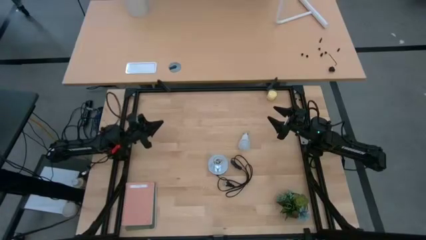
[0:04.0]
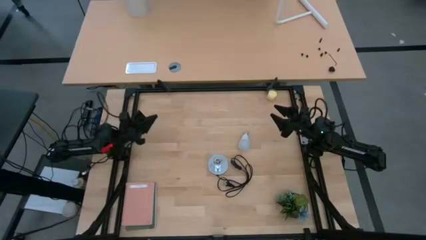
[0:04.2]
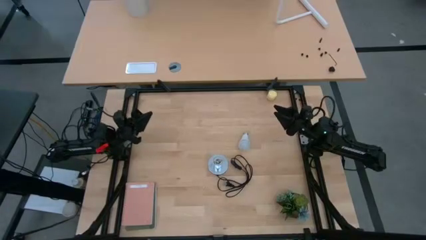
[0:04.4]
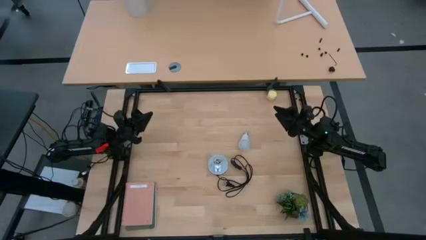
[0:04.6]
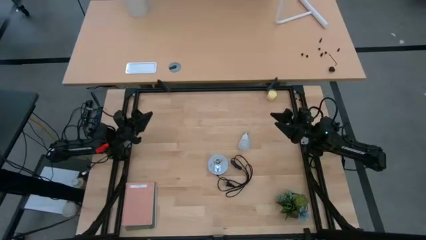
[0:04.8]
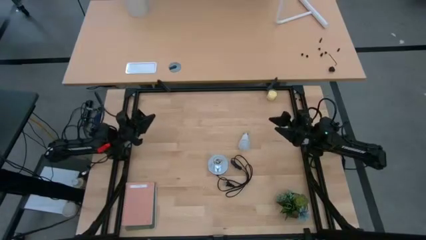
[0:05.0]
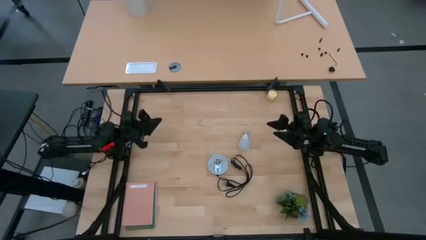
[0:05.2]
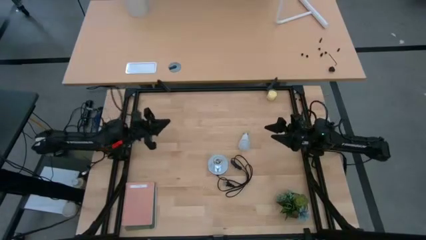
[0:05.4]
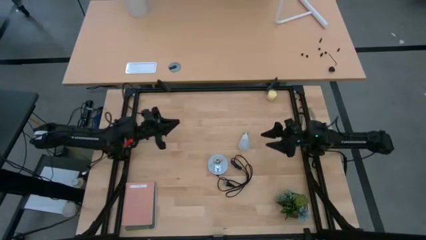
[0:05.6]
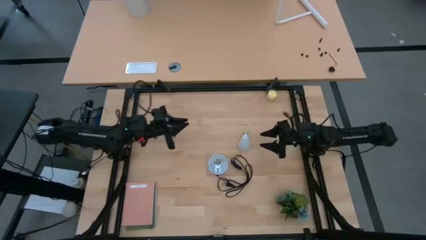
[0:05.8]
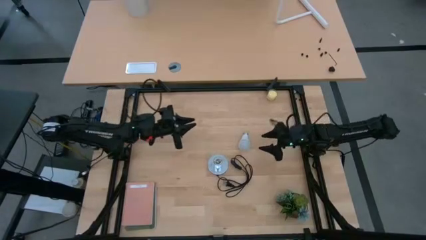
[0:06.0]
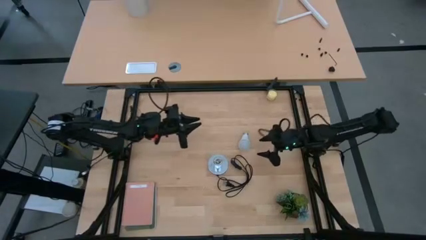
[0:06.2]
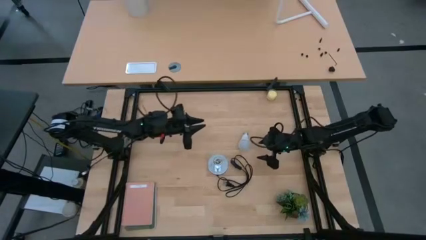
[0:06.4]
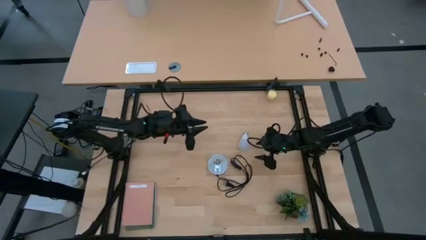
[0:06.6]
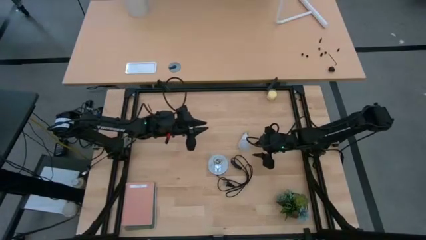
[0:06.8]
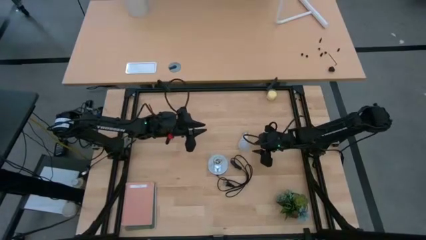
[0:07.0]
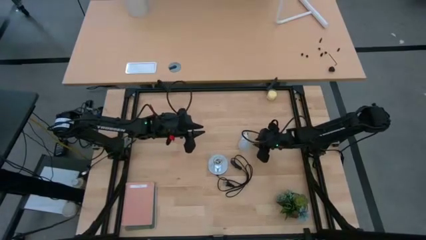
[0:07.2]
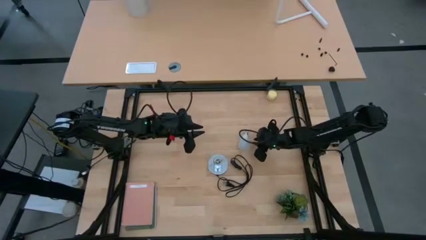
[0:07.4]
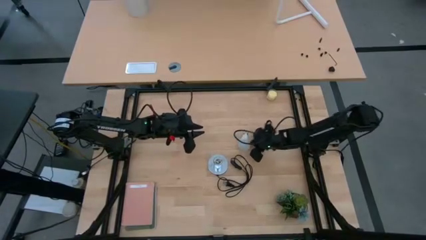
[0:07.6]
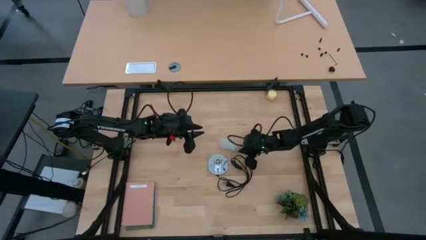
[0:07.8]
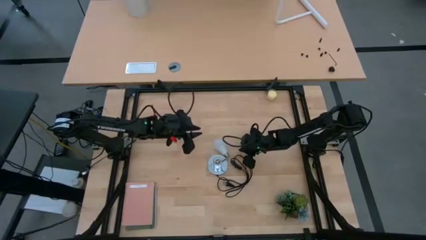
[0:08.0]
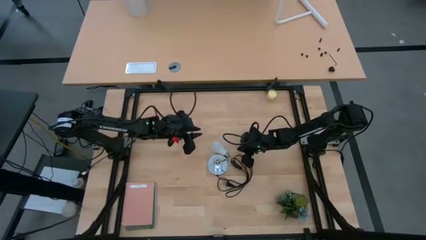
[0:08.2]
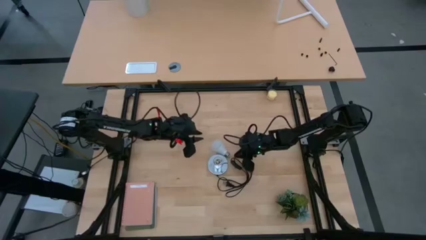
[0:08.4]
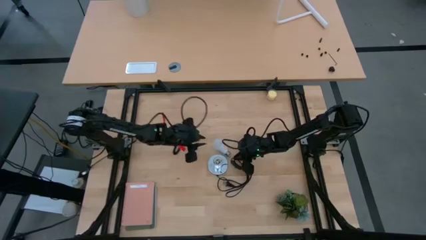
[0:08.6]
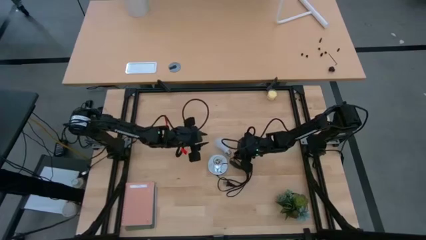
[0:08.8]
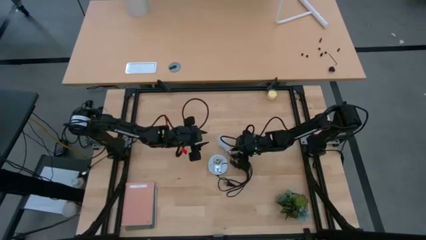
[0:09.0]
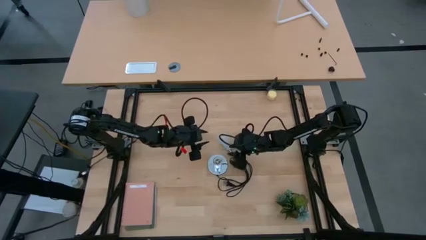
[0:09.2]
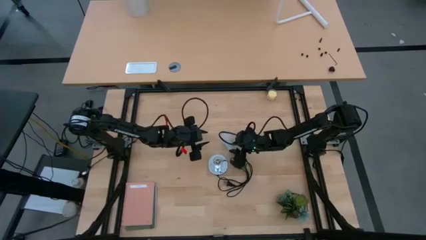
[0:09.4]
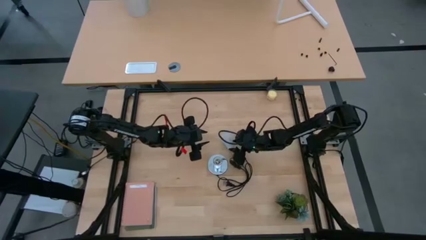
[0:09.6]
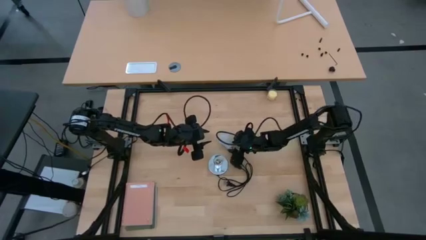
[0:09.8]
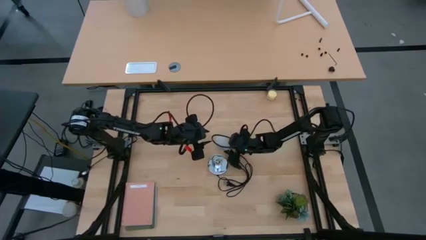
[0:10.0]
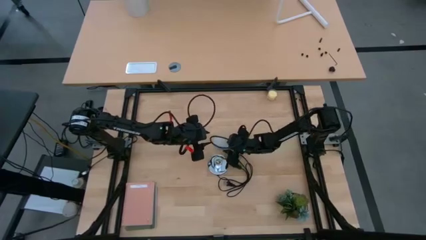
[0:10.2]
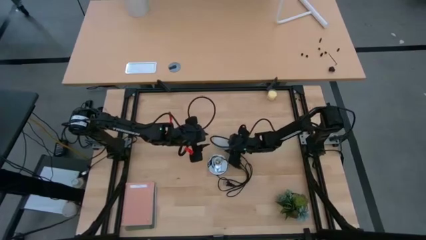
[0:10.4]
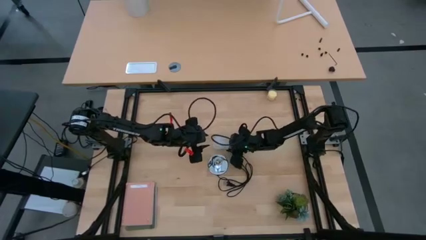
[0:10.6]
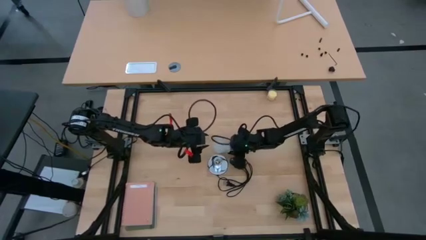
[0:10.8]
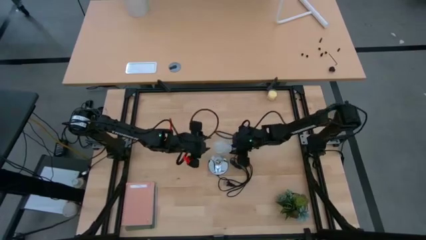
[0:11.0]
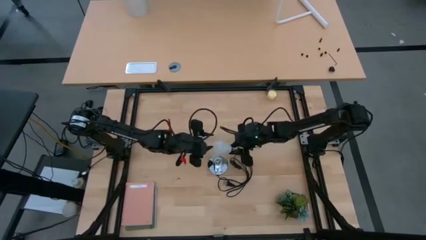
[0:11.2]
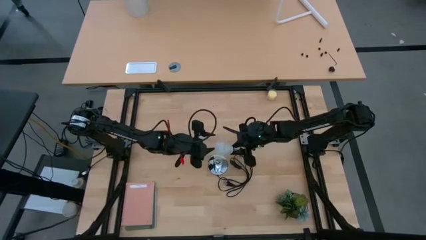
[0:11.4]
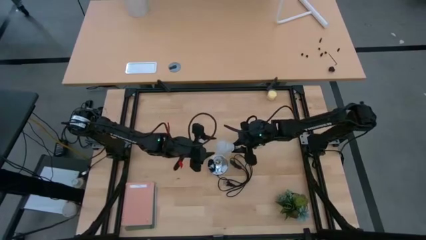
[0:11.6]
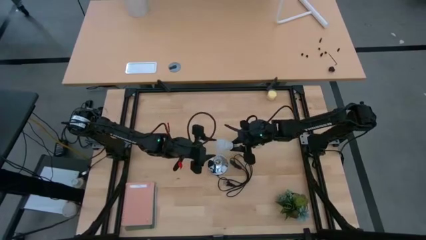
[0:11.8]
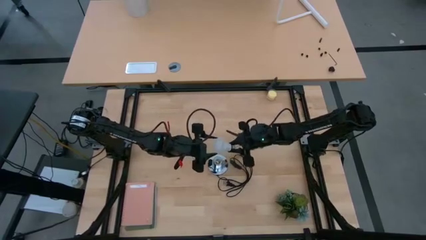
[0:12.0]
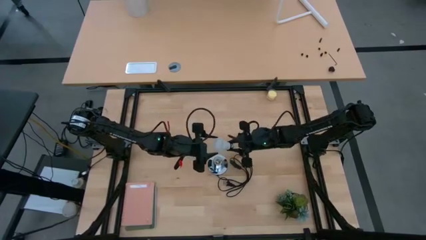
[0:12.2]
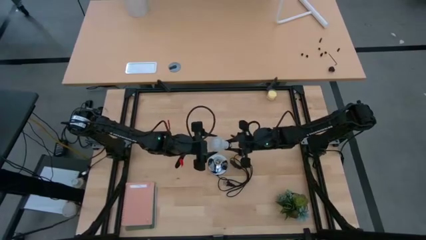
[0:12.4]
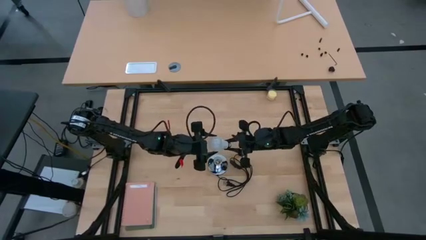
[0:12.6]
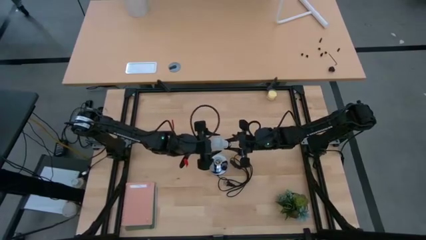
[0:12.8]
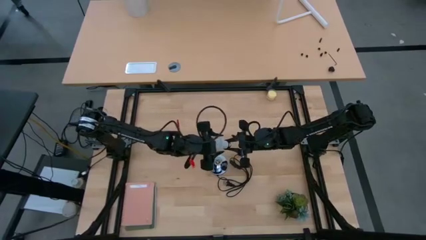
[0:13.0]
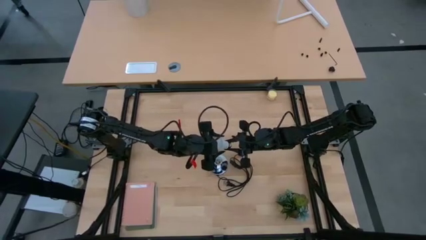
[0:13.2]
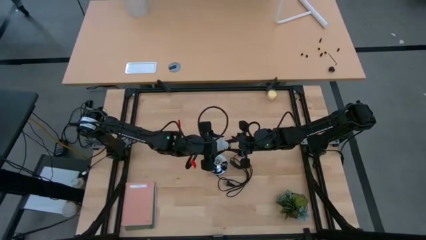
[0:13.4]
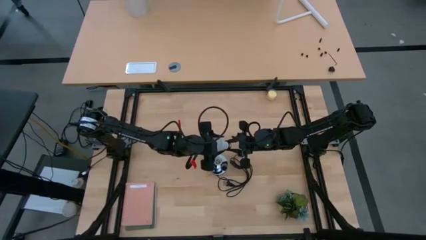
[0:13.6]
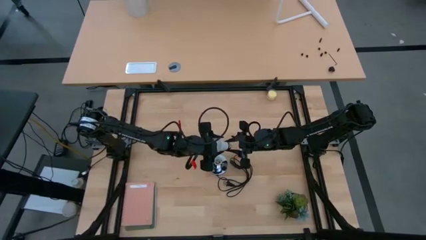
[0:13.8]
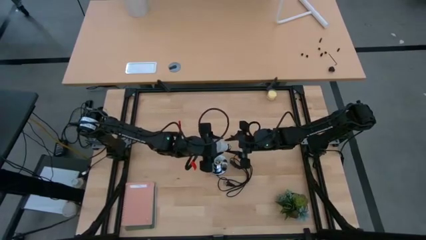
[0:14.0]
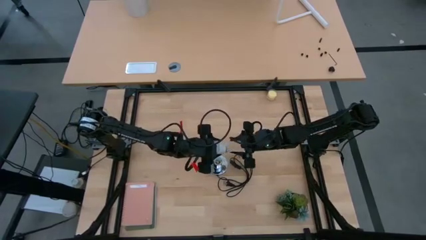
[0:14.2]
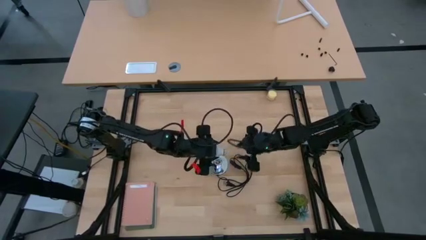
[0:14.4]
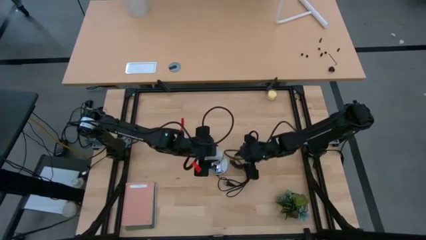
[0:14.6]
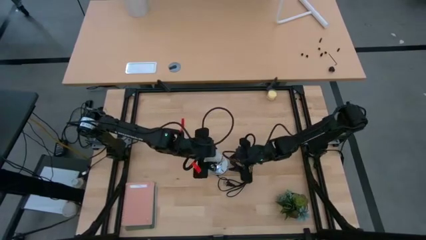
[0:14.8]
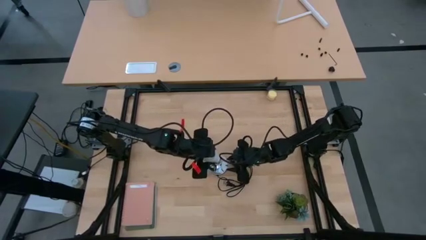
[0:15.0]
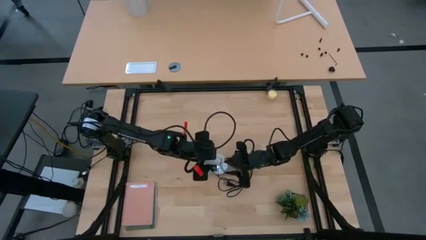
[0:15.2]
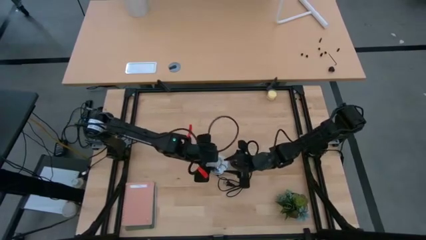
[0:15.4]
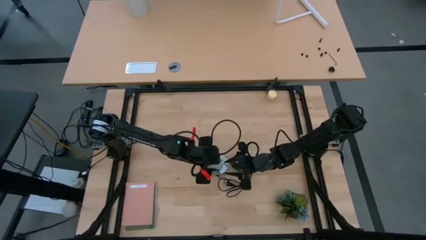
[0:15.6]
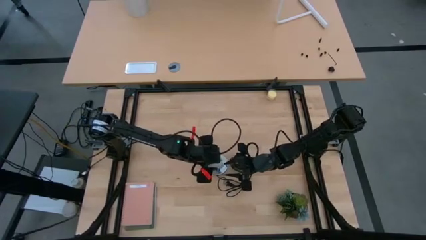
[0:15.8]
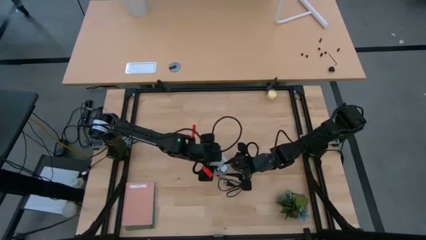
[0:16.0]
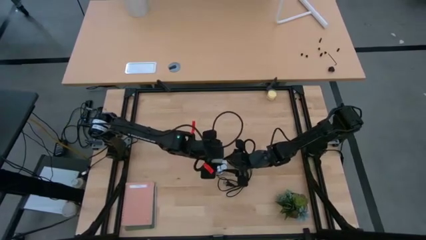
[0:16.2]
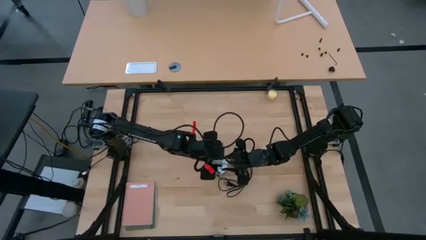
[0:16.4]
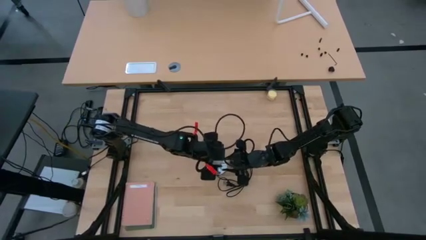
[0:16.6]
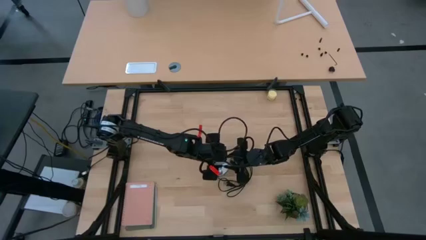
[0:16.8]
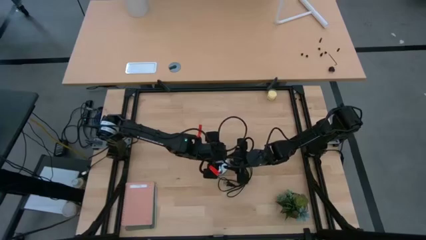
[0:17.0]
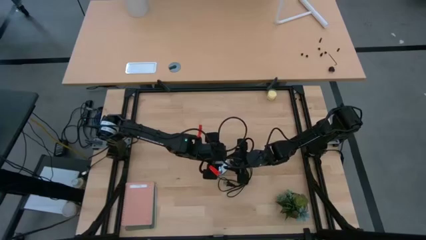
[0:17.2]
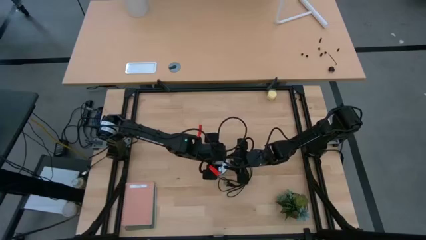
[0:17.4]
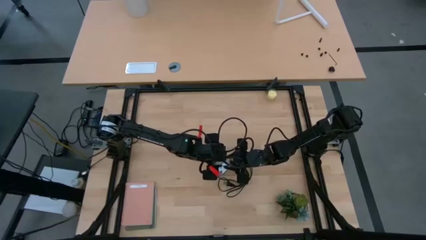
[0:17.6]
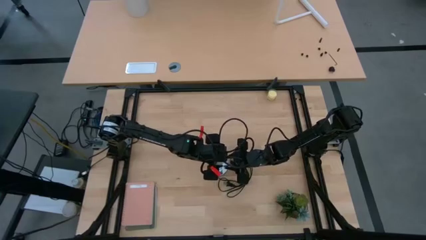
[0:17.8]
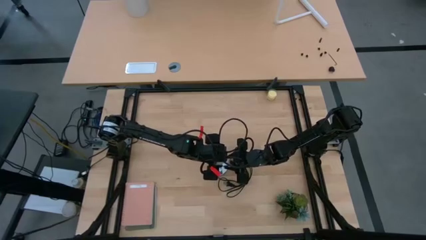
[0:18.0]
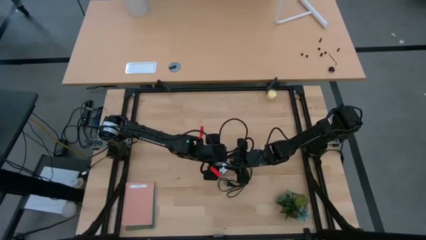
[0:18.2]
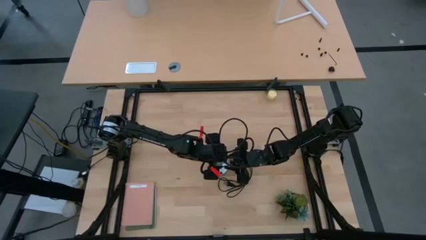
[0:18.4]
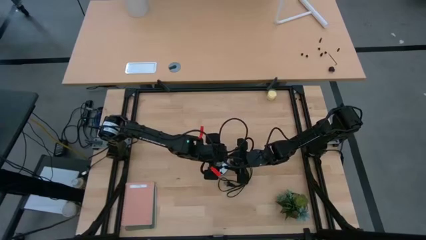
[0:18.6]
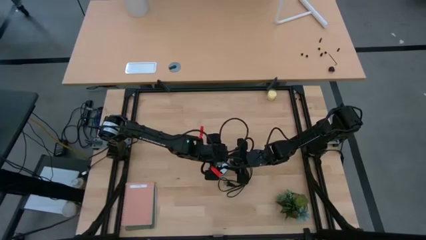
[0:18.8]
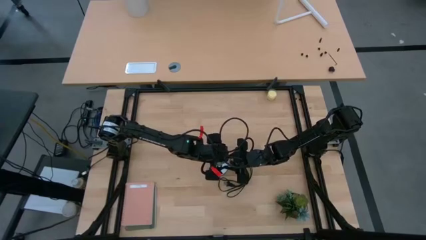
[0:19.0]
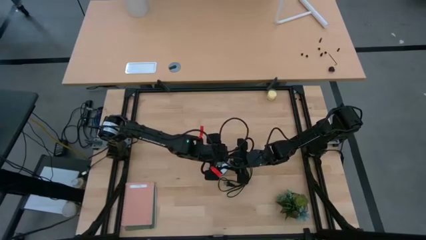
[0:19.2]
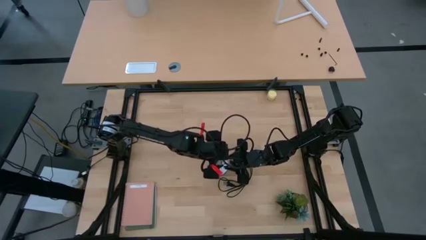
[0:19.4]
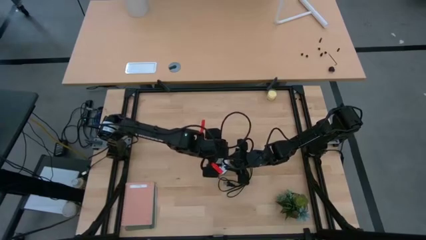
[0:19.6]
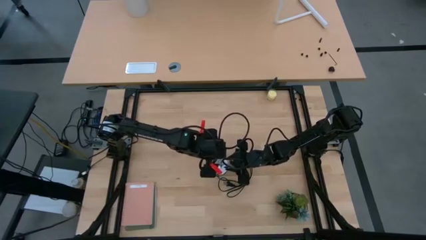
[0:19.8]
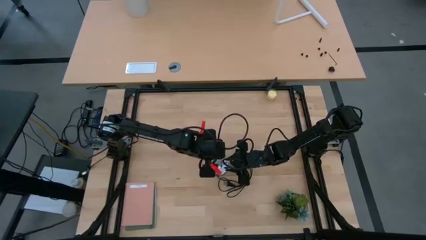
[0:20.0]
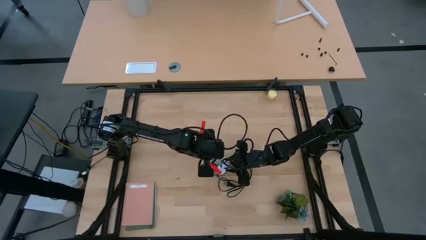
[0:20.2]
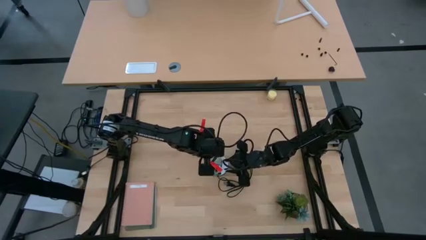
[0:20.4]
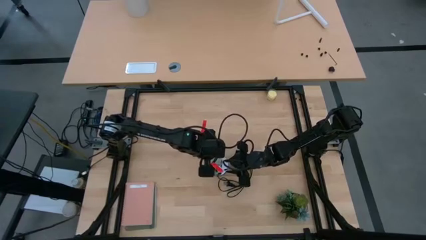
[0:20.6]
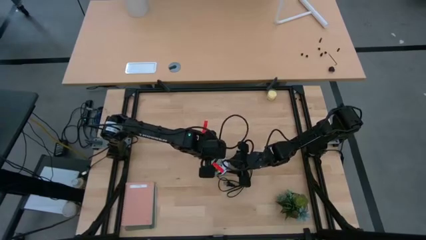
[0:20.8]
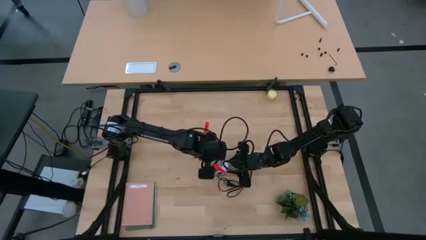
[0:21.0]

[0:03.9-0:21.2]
Task: Screw lightbulb
Insert the white lightbulb into the silver lamp
